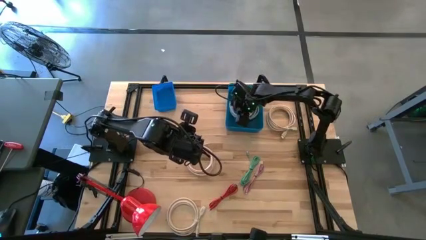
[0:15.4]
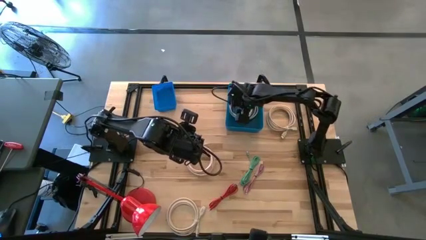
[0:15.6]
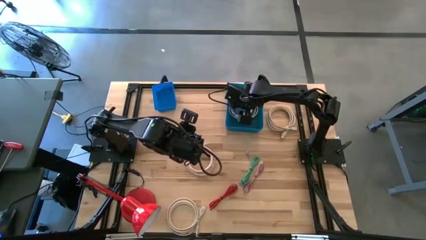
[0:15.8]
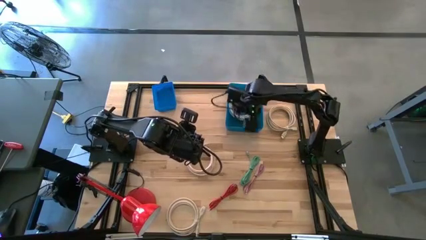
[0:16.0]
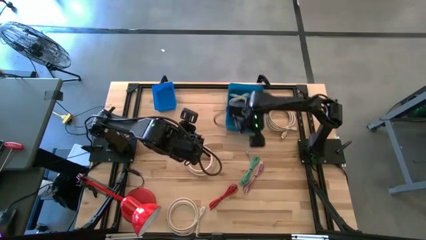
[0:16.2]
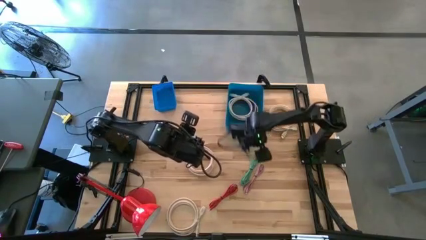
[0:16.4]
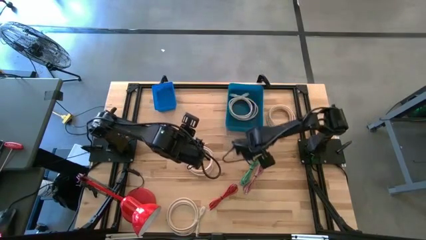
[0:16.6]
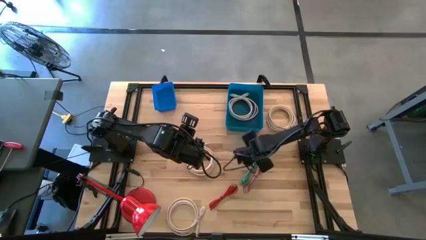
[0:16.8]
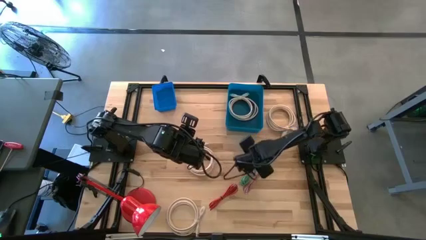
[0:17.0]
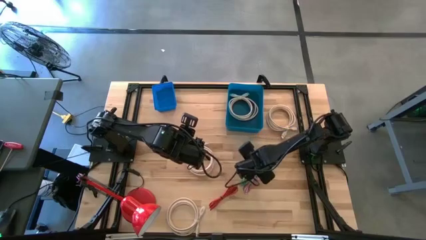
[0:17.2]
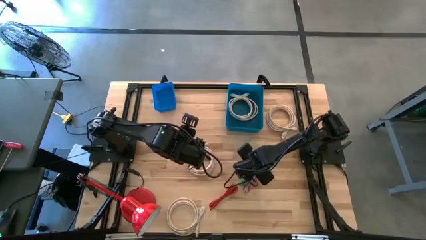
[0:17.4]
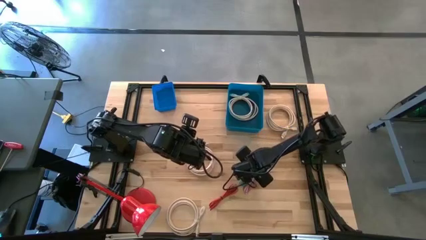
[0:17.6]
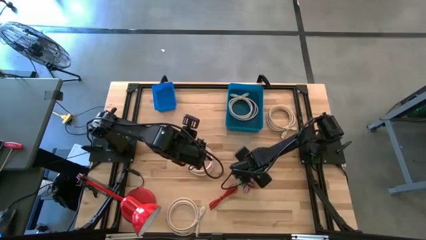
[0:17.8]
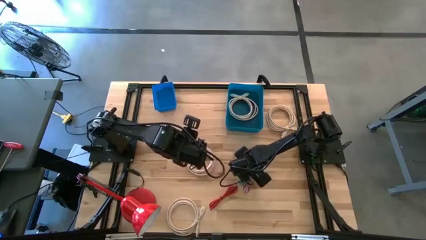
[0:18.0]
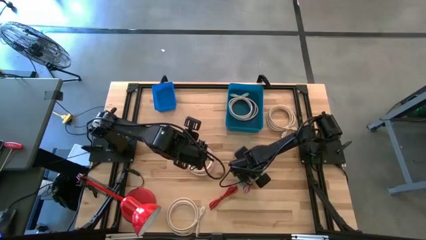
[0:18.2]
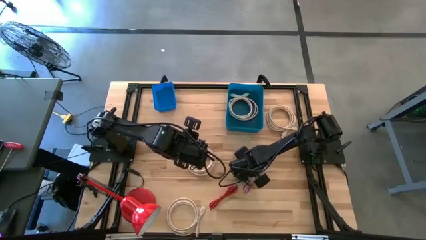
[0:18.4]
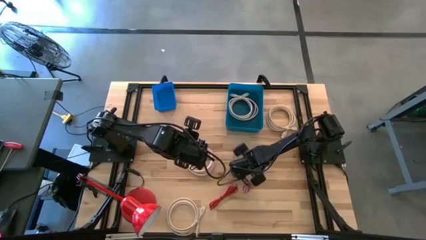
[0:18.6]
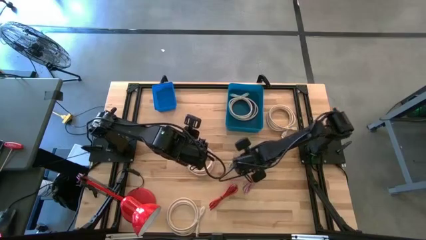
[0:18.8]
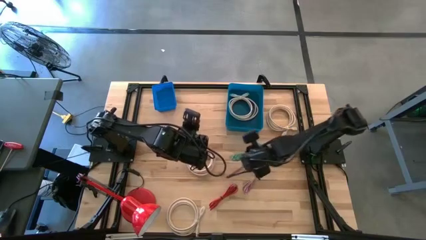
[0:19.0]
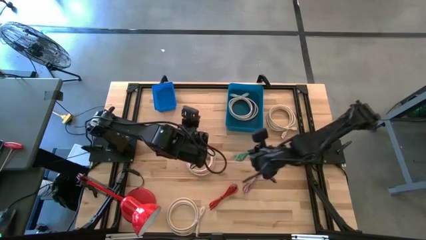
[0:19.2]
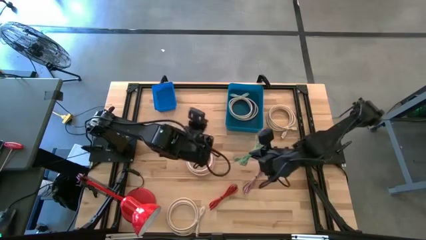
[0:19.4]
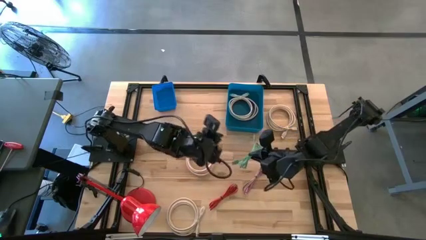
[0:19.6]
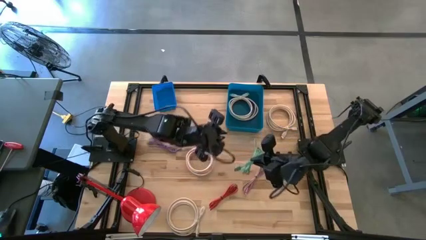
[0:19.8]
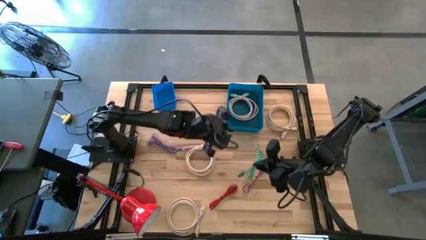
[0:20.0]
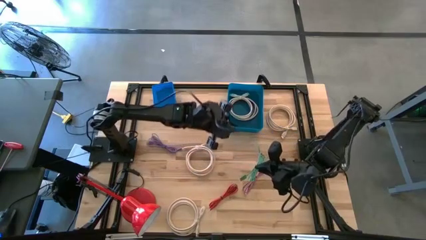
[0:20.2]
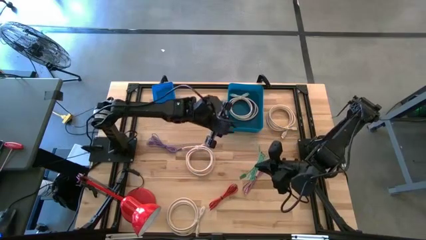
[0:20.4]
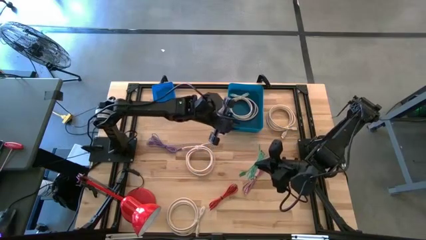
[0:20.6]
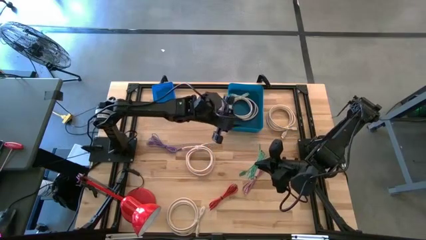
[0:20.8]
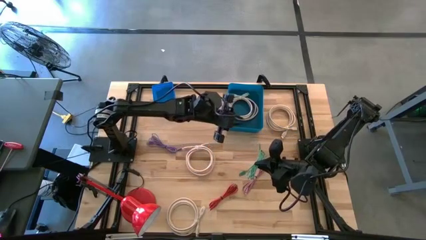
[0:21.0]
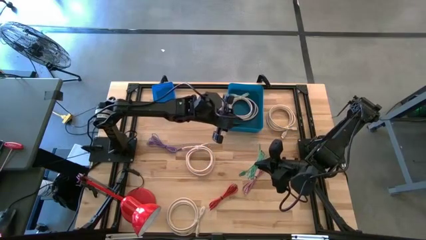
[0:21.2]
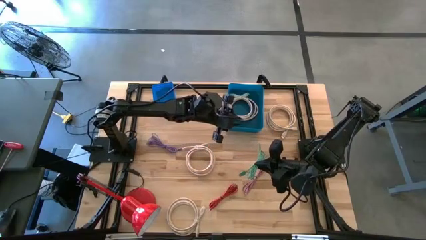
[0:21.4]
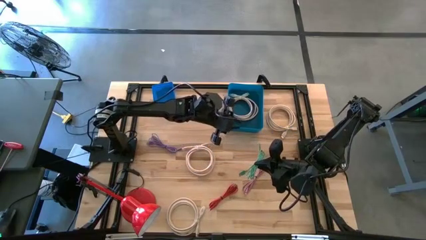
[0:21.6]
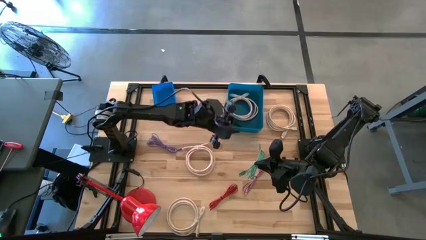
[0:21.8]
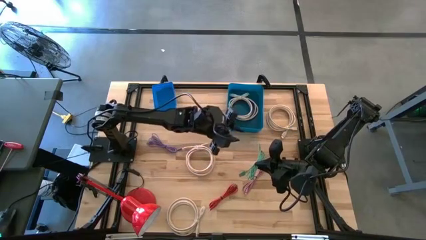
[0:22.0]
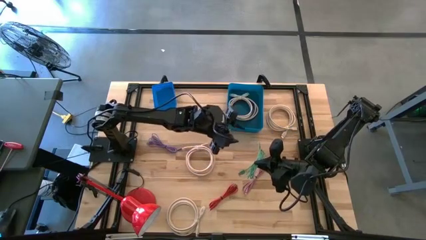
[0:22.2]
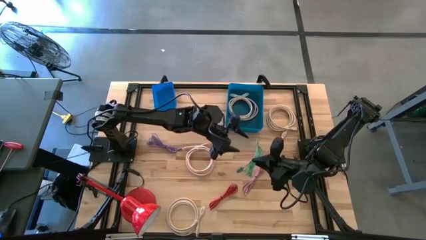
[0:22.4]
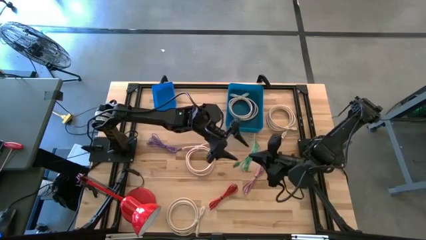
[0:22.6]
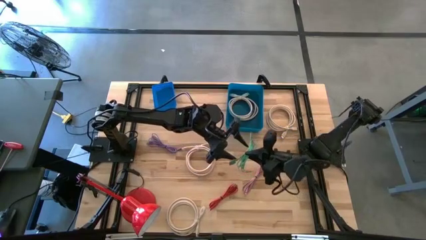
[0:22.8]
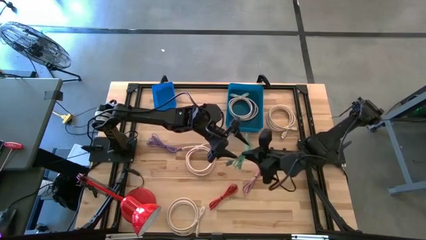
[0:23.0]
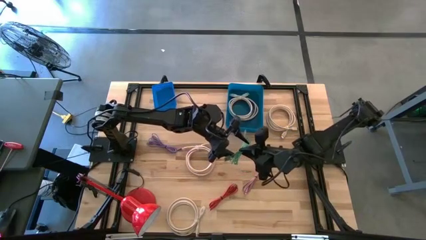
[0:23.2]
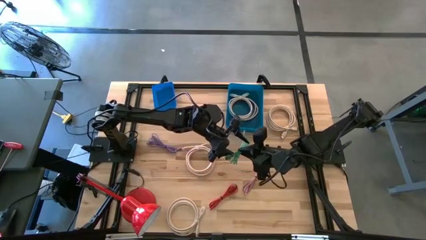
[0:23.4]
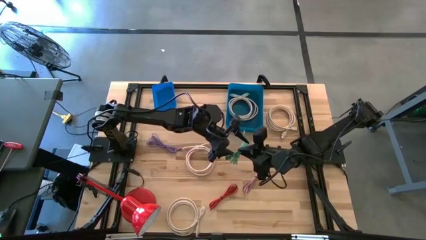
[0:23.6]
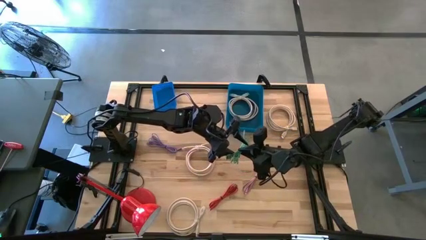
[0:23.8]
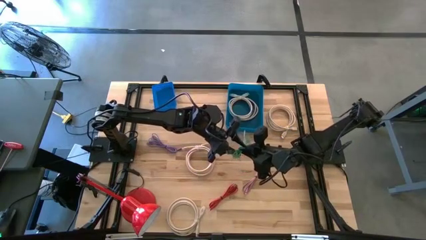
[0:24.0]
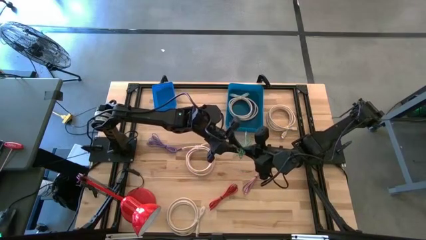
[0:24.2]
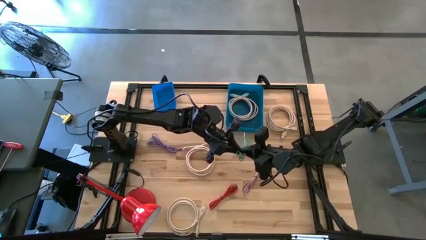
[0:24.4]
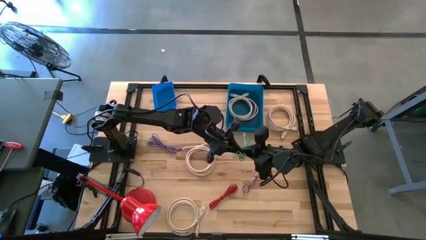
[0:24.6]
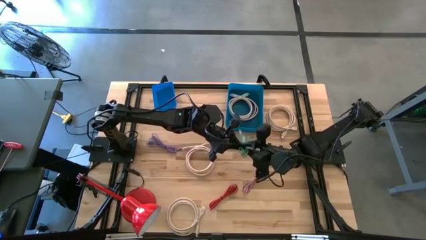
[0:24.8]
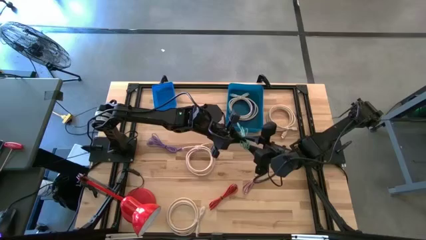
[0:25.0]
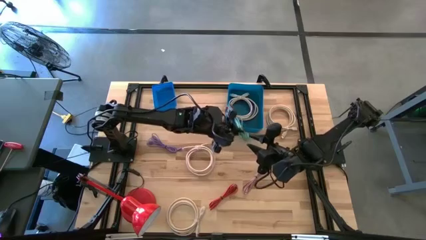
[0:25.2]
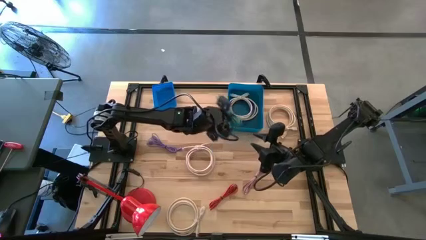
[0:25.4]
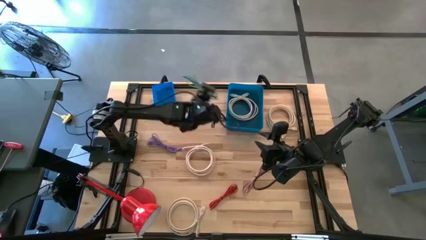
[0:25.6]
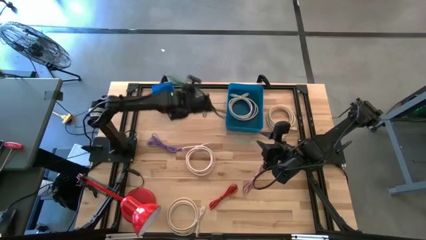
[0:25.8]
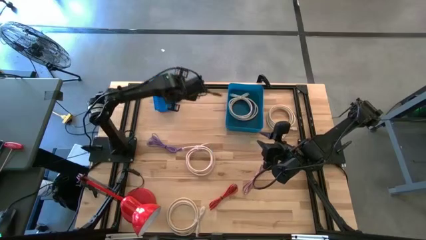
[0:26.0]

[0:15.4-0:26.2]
Task: Pick & Place USB Port
Put the green charger cable into the blue bin
